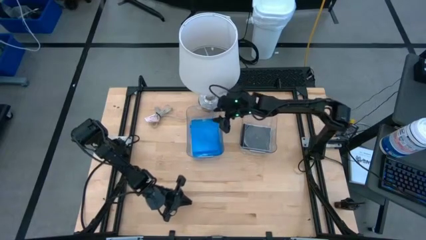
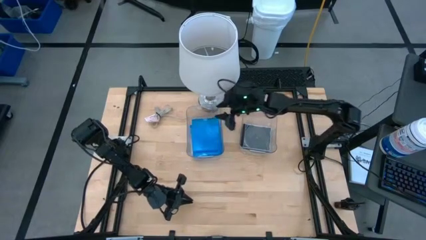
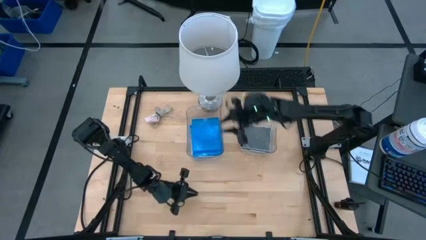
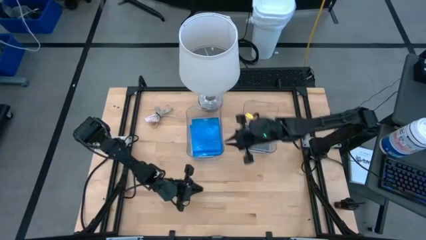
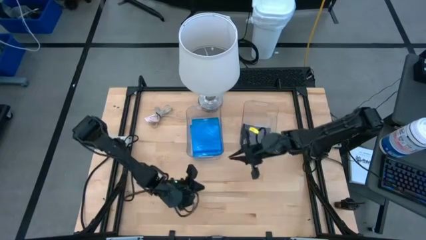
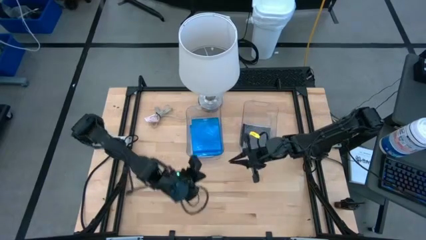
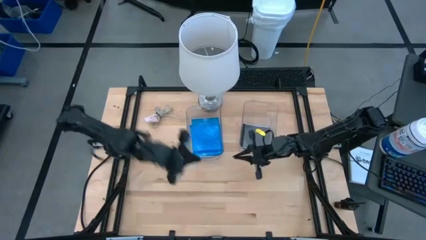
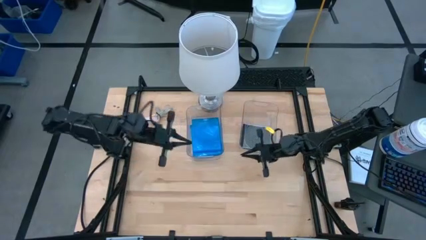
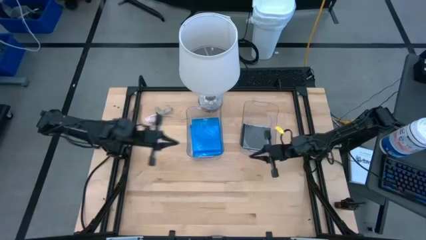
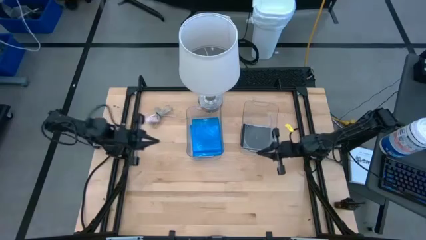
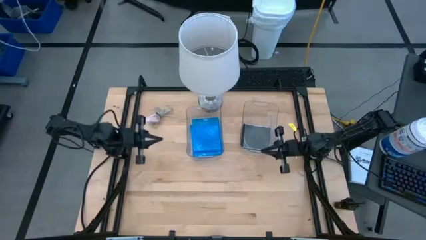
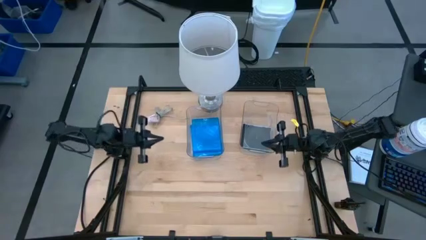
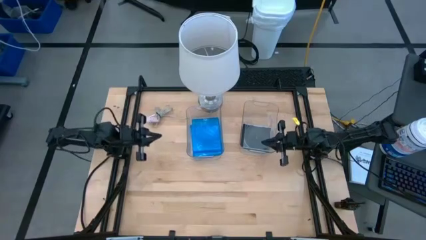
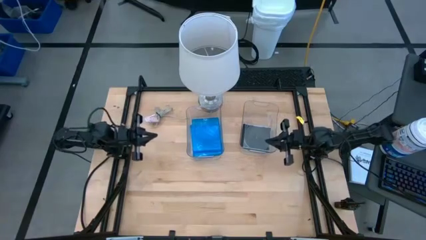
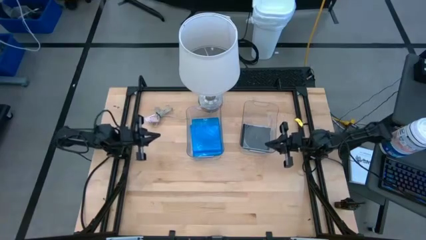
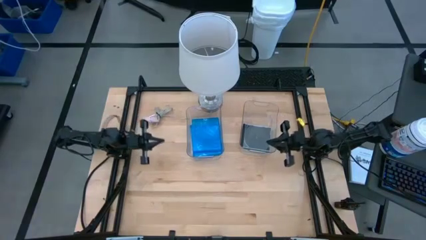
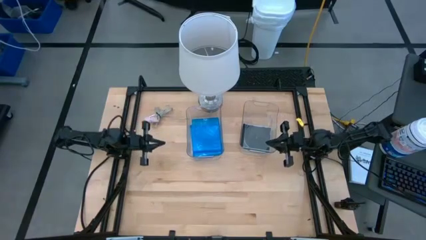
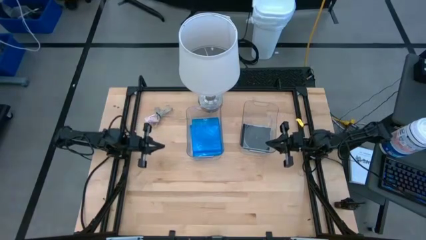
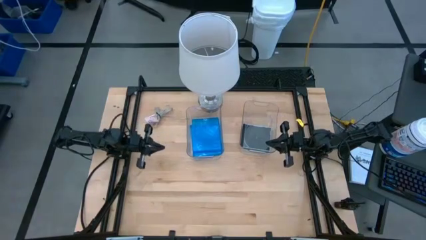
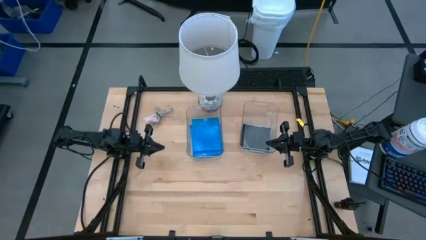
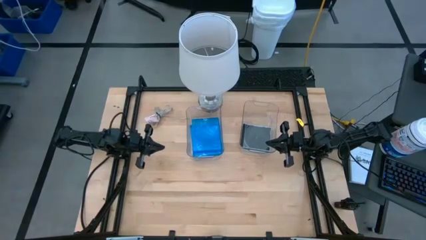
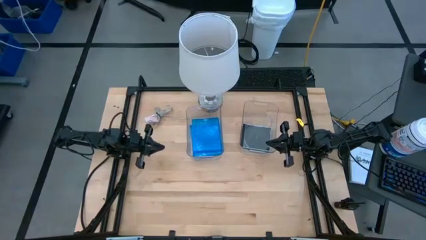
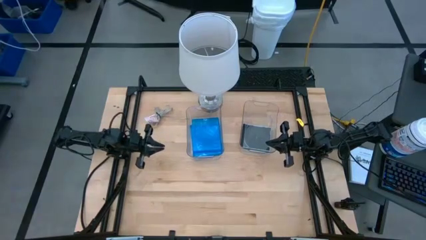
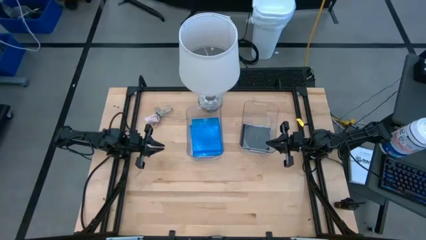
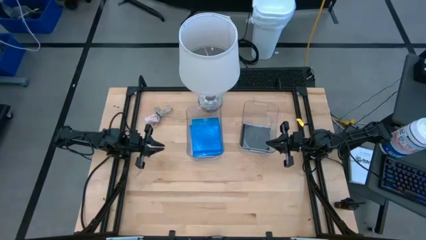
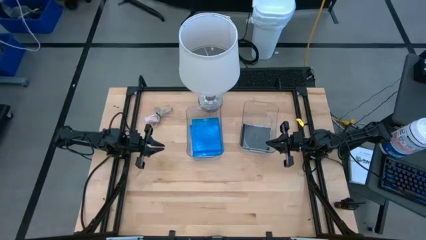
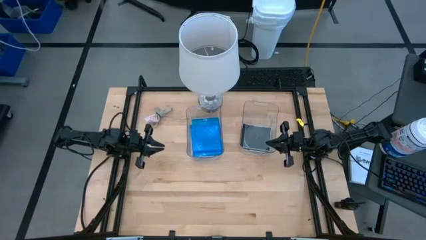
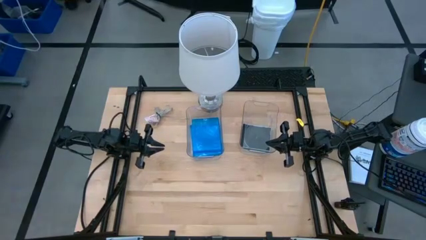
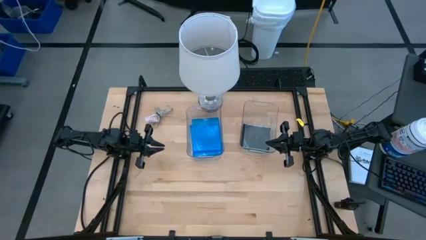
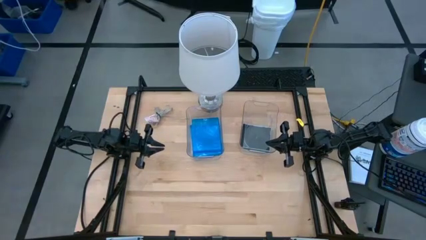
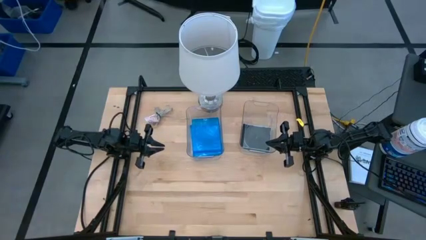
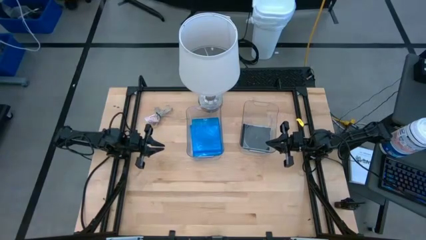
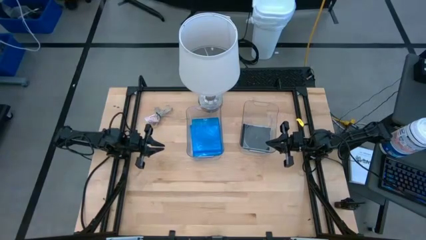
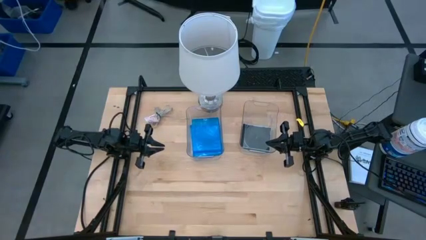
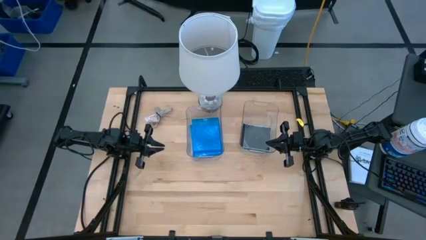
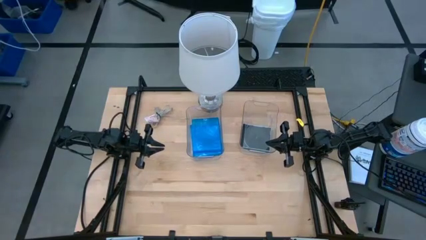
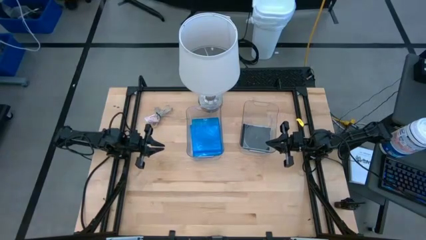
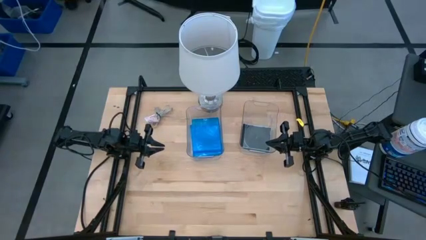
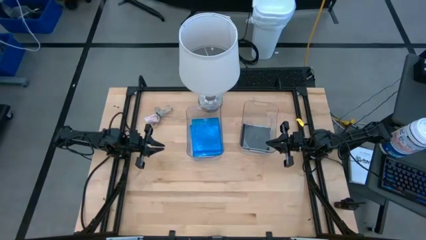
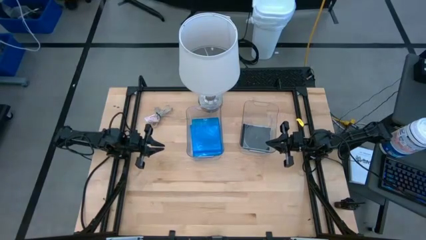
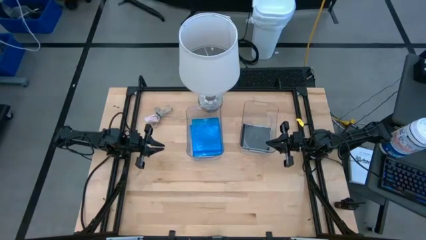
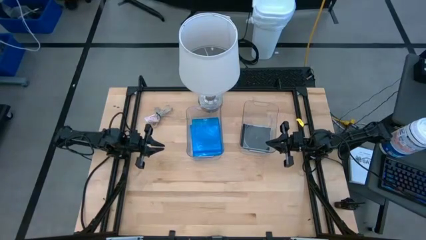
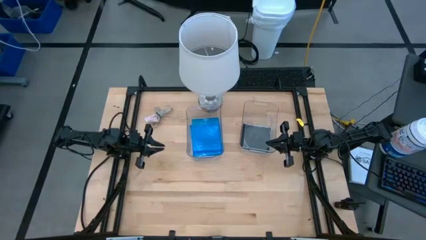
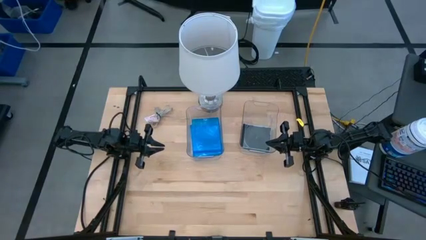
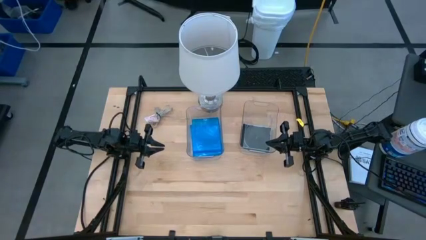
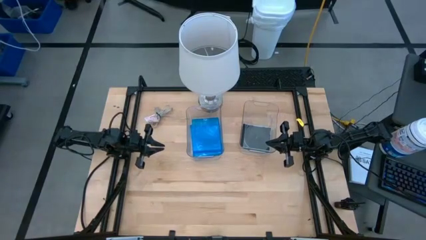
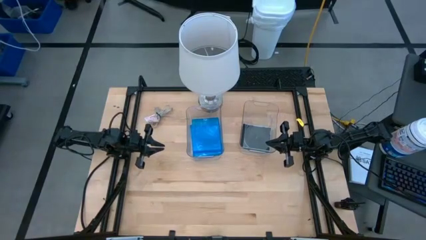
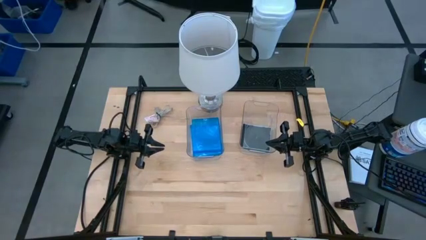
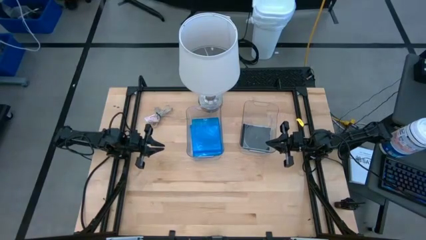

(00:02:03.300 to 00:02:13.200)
Task: Pick & place jewel cases by type
Return to Home Position
